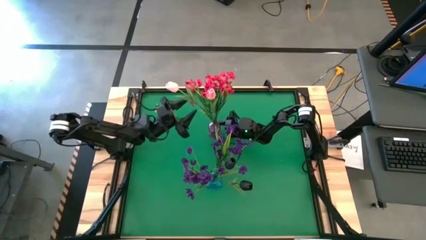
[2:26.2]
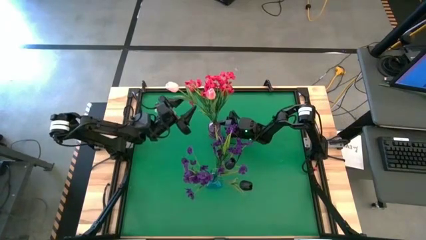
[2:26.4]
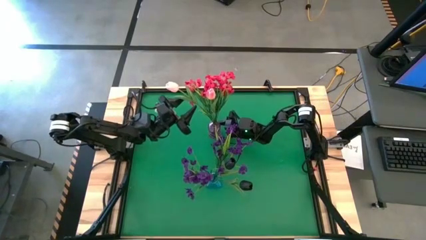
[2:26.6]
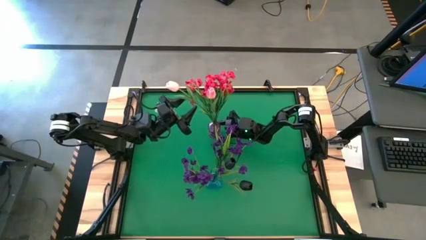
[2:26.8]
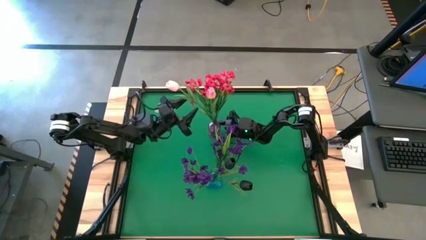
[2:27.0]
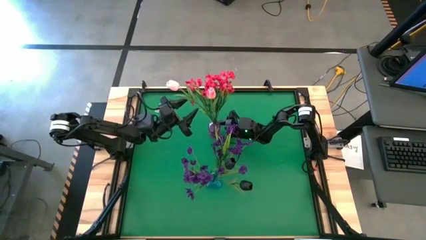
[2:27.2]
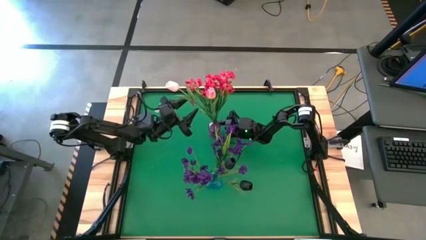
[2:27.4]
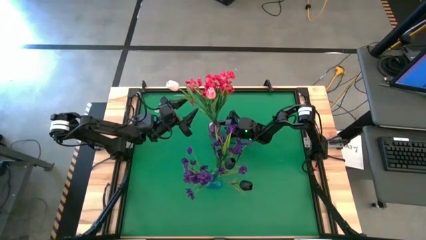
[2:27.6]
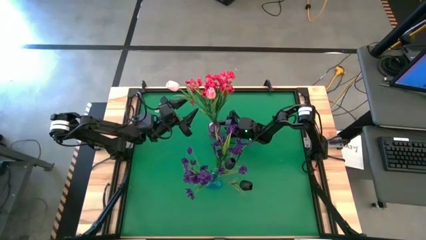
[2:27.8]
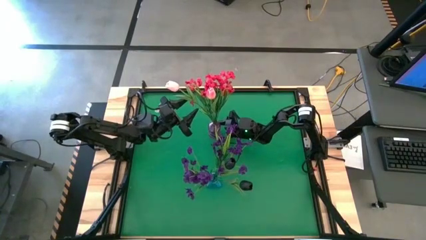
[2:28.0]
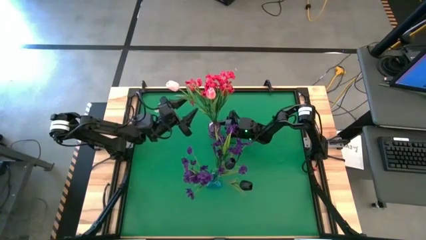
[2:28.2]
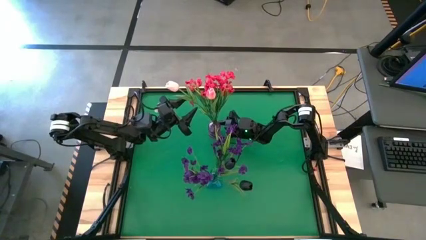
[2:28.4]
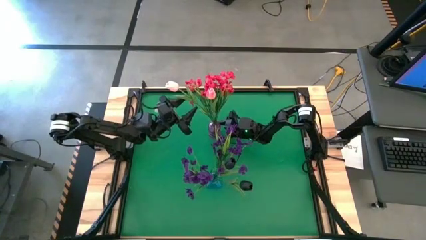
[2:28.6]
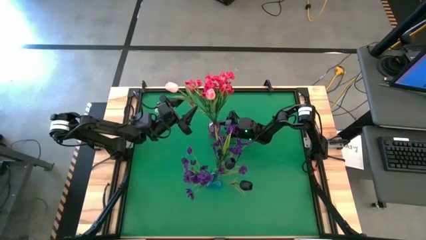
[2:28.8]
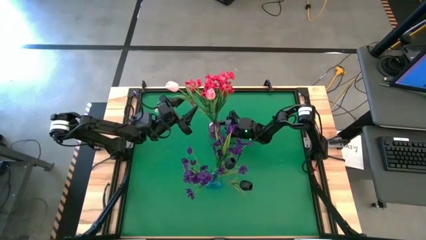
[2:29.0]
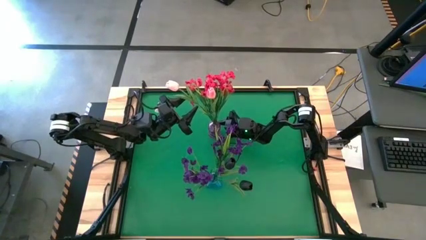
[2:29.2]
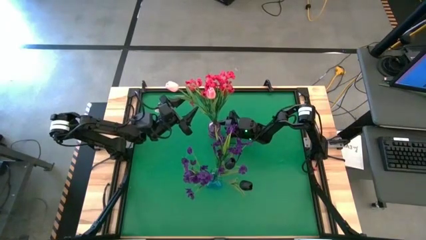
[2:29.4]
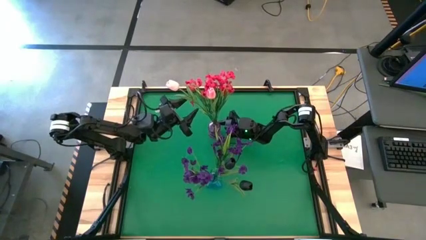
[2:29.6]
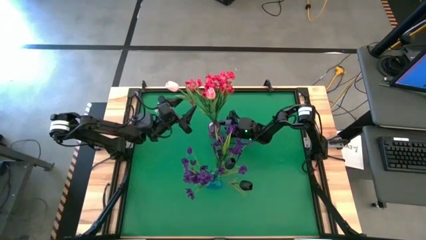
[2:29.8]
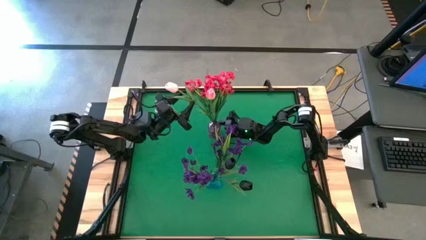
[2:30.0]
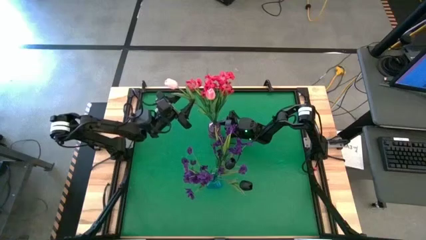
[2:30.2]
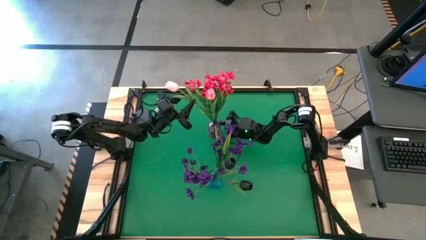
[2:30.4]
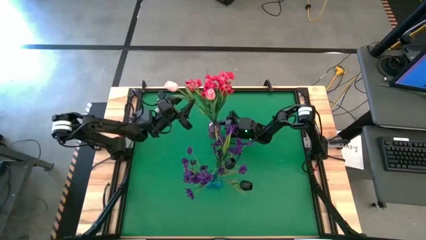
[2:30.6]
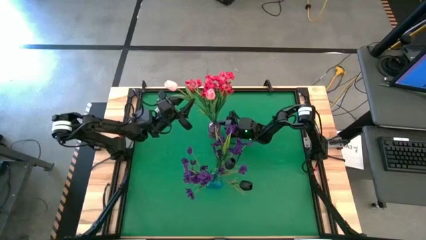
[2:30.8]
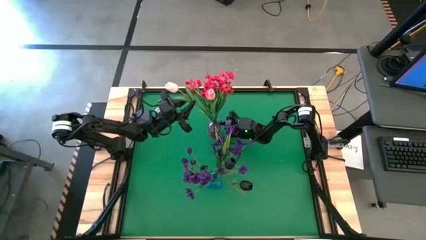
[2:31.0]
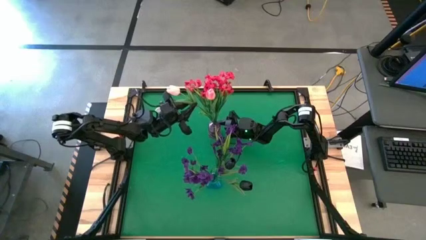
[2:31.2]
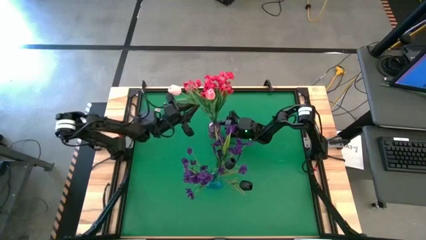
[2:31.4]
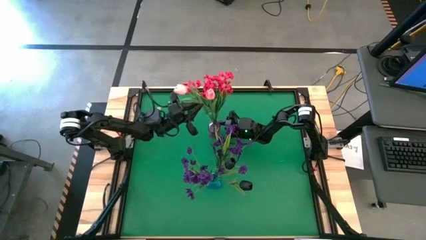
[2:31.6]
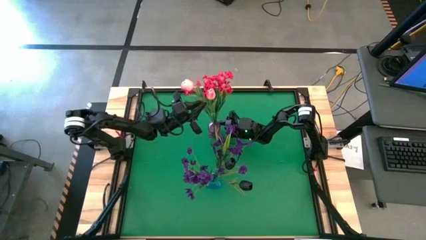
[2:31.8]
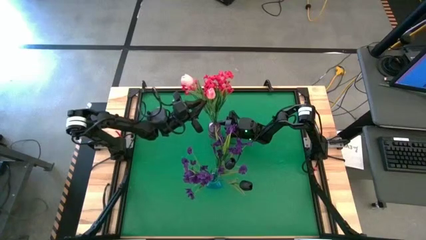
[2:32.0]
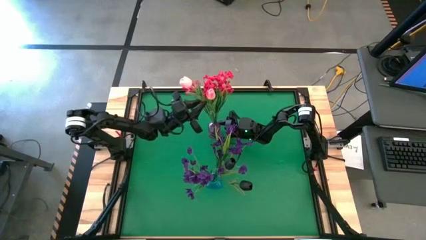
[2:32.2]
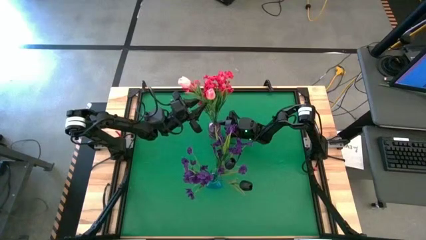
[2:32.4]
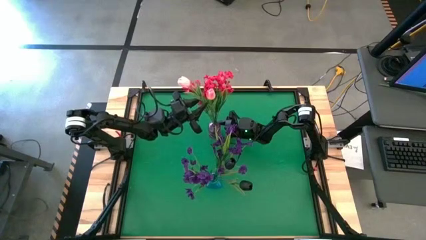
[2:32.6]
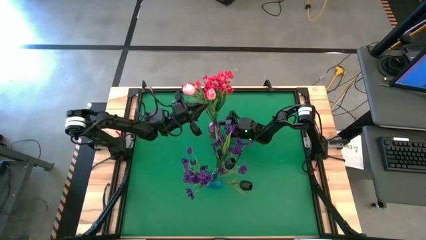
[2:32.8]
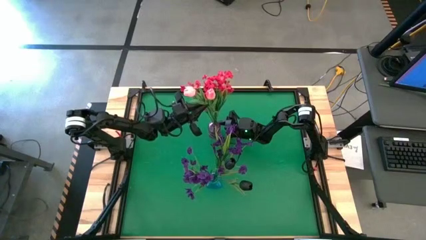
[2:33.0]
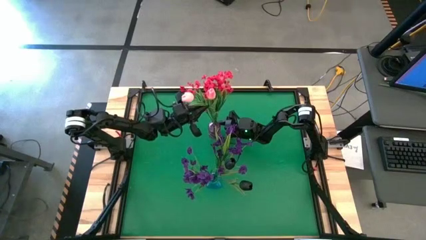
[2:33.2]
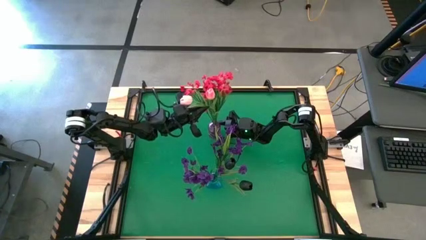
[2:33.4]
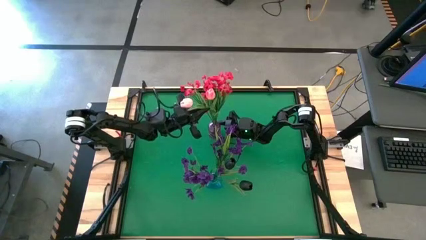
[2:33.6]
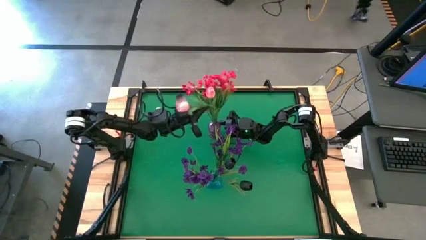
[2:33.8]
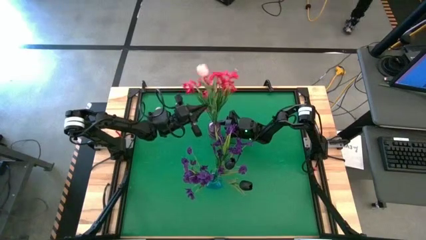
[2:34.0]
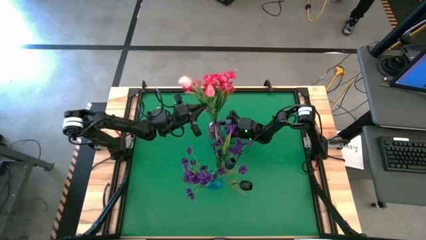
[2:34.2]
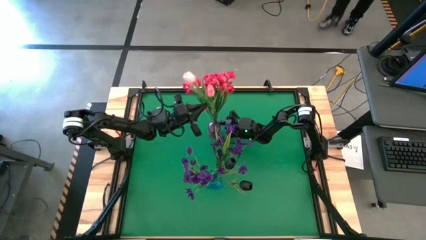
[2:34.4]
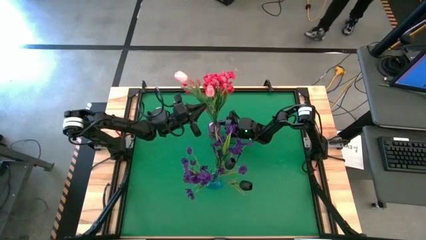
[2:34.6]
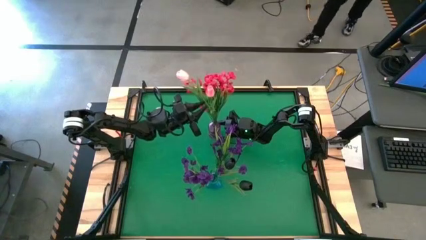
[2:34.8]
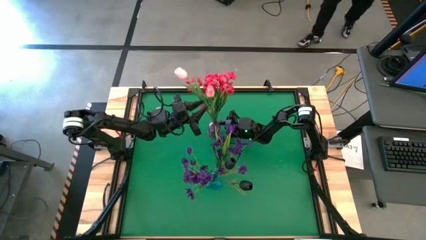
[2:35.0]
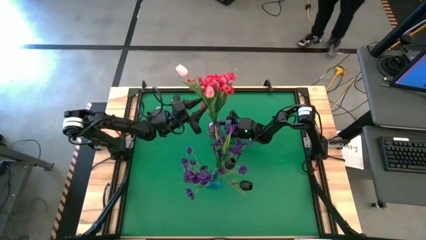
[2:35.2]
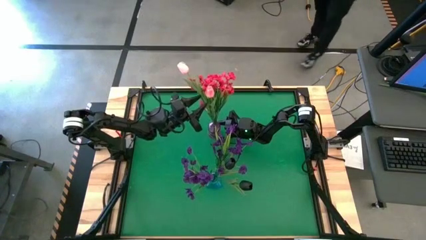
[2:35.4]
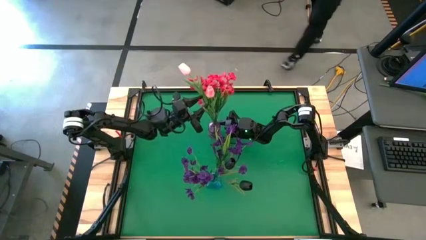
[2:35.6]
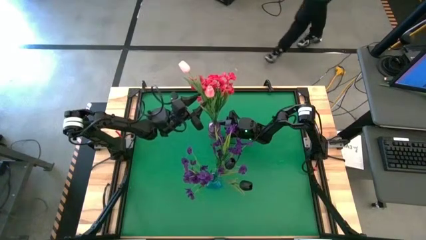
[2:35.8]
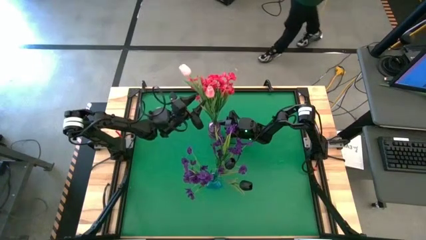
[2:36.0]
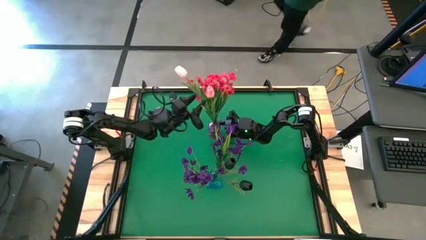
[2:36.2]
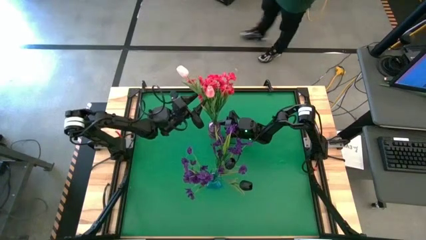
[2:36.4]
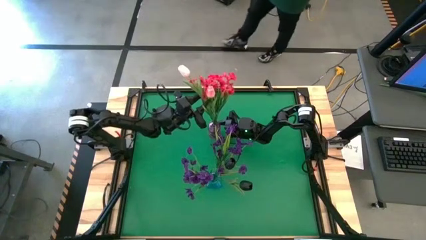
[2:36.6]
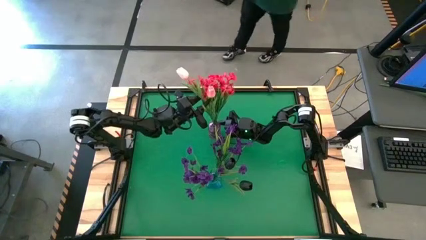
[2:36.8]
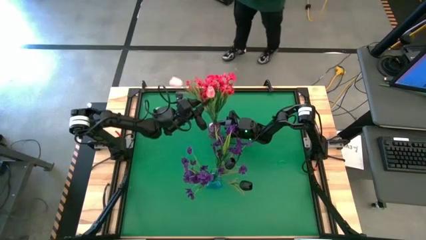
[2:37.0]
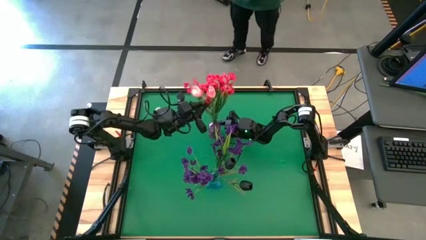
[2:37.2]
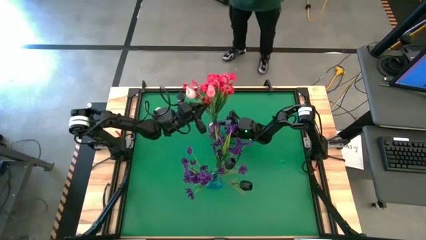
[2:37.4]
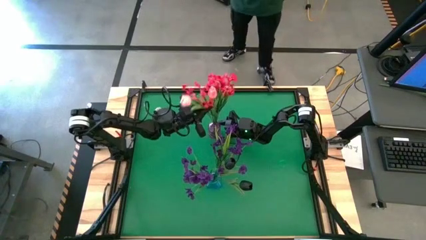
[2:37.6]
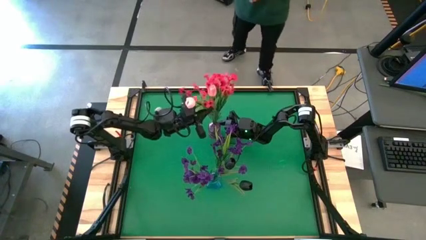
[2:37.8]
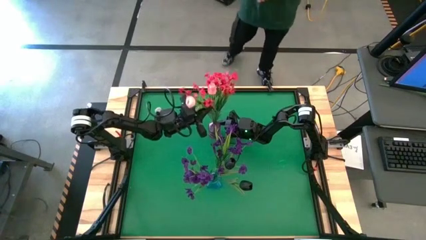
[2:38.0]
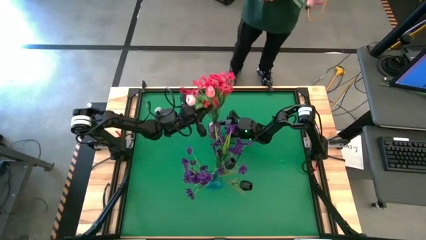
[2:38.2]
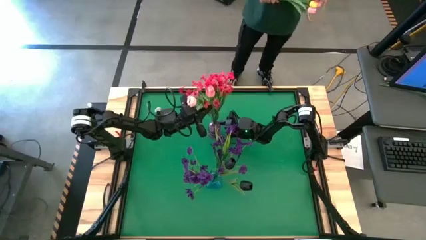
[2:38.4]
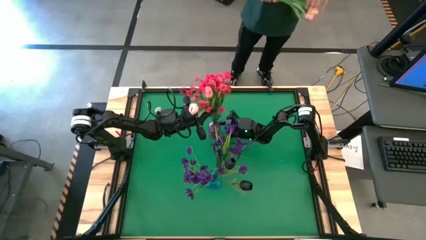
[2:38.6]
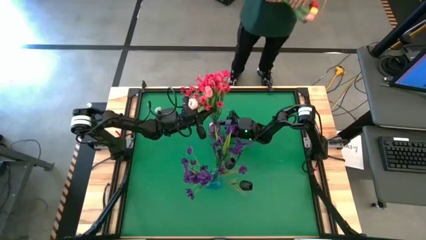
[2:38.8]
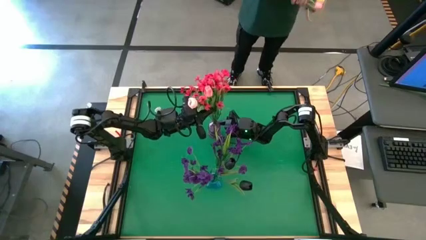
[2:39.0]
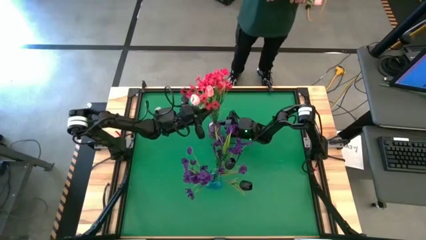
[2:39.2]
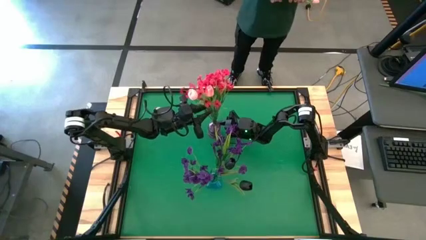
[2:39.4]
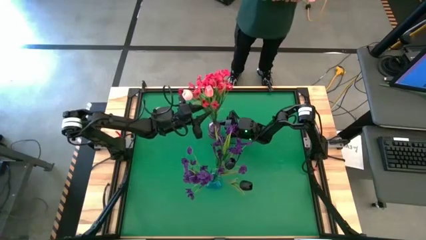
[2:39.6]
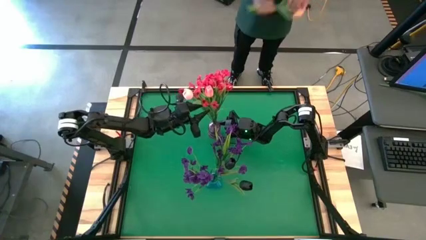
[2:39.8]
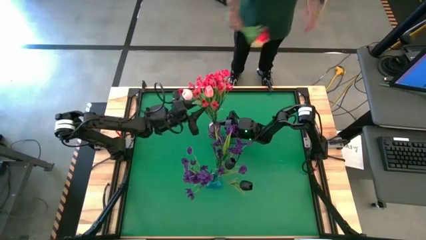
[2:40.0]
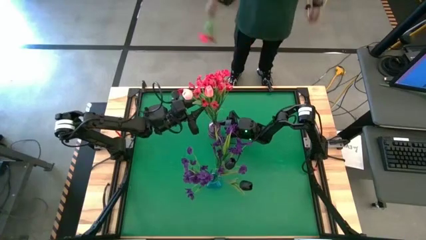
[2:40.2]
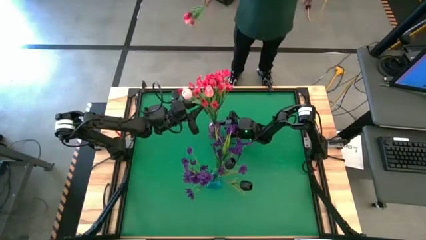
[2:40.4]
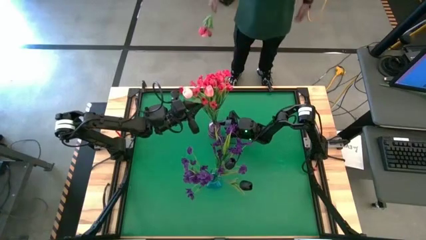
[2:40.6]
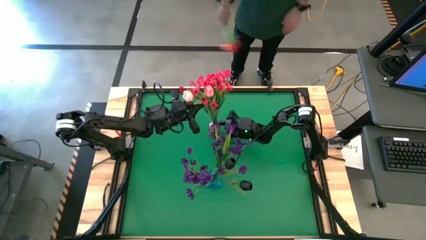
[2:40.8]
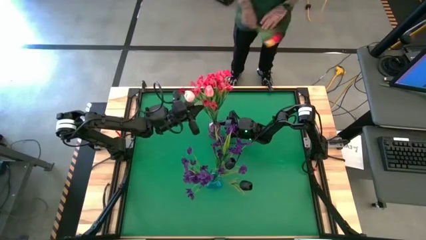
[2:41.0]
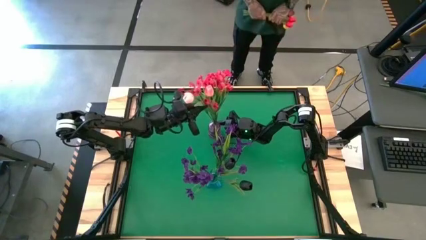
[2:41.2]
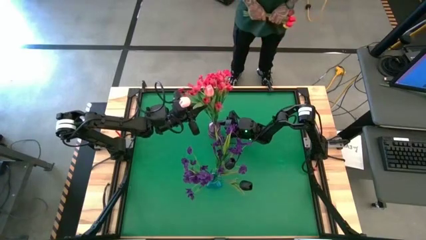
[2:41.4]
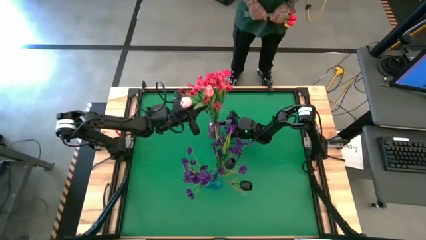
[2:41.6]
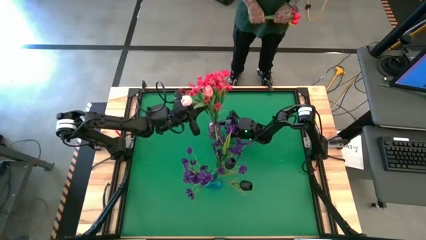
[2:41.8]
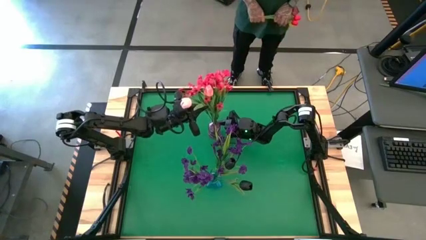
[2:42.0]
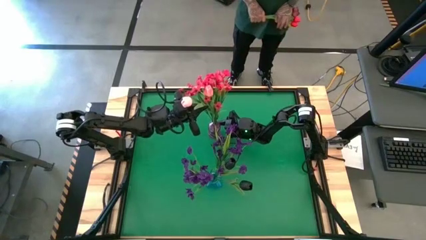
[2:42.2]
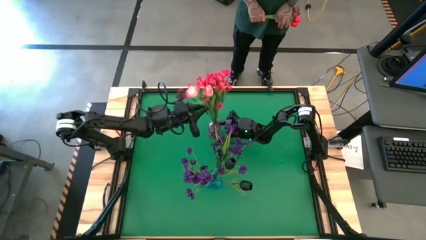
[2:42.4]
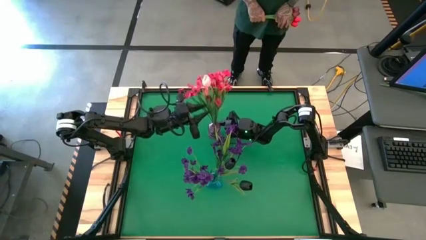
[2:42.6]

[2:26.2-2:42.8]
Task: Sort flowers into vase by color
Put the pink tulip into the purple vase
